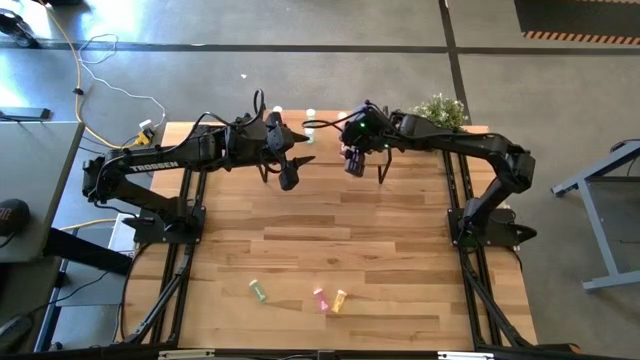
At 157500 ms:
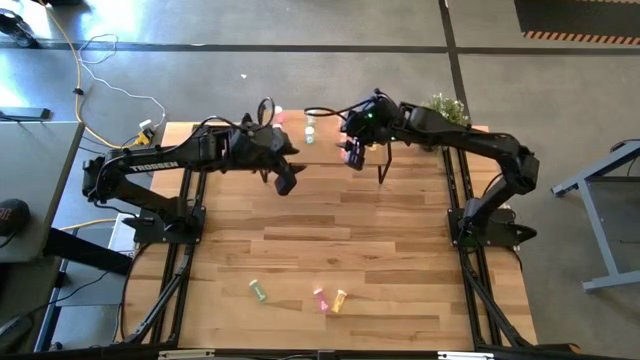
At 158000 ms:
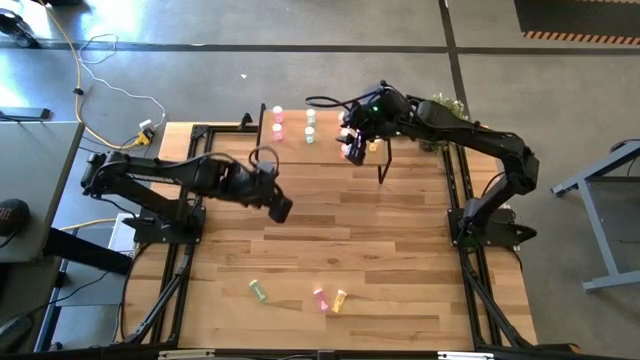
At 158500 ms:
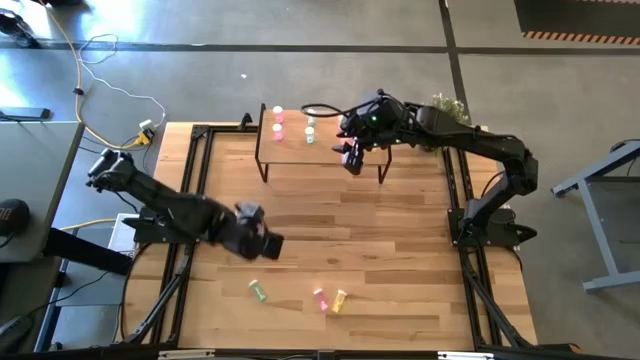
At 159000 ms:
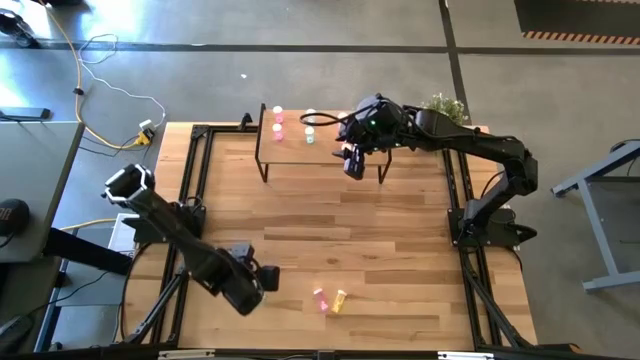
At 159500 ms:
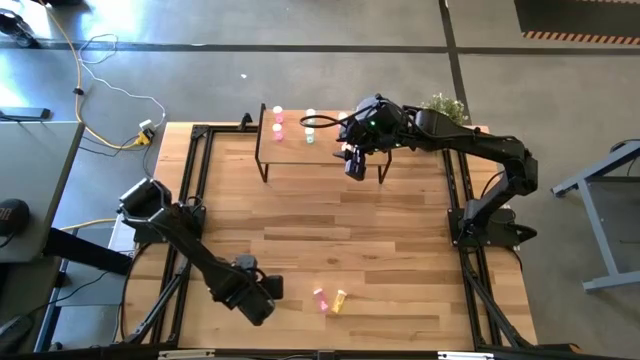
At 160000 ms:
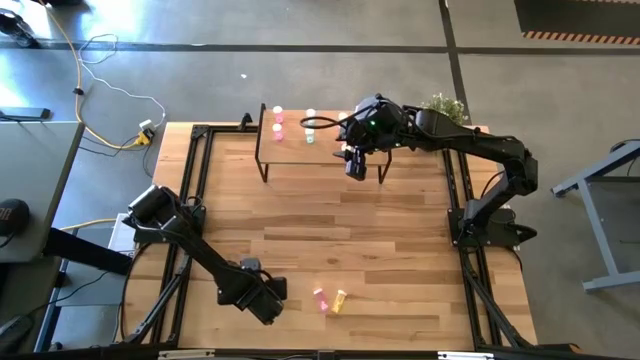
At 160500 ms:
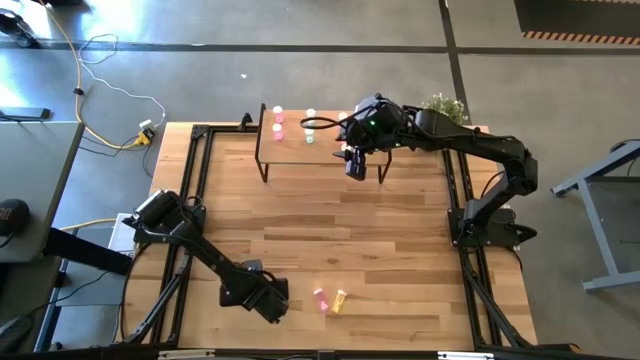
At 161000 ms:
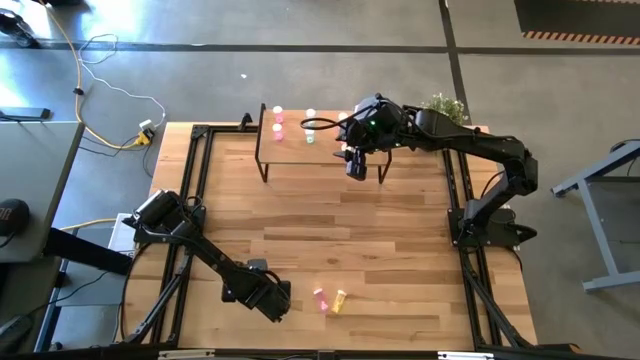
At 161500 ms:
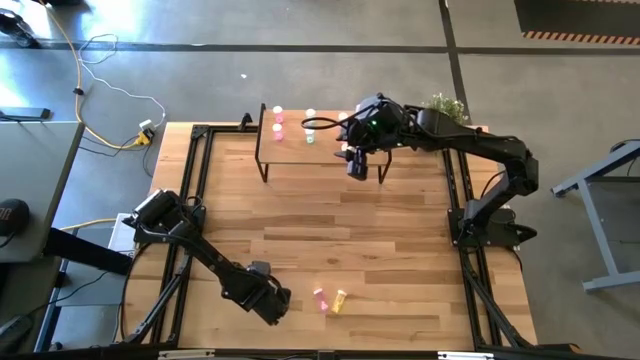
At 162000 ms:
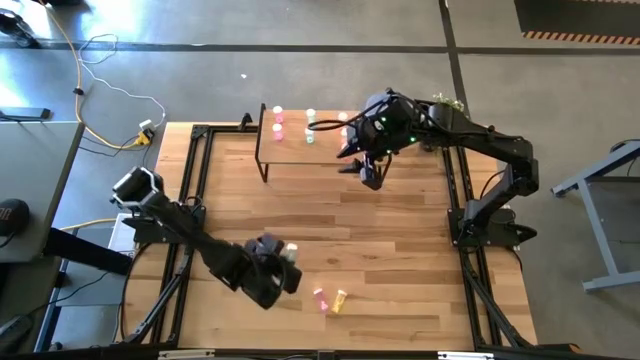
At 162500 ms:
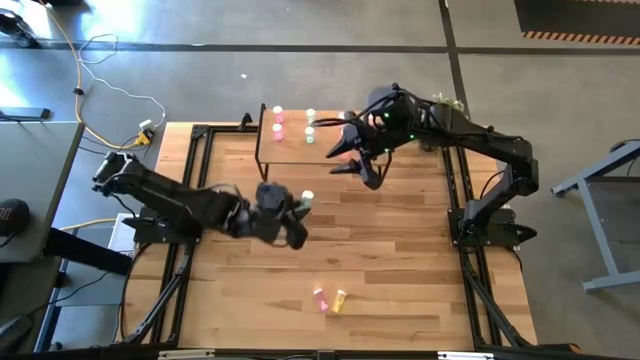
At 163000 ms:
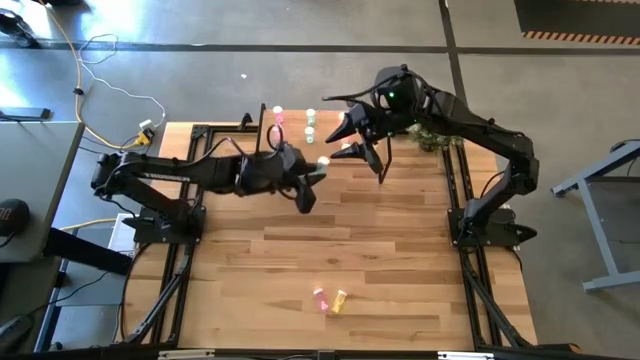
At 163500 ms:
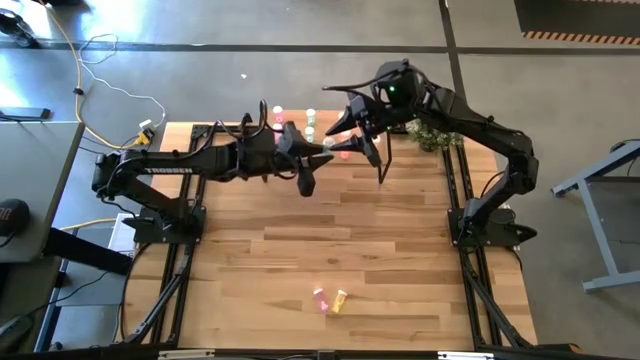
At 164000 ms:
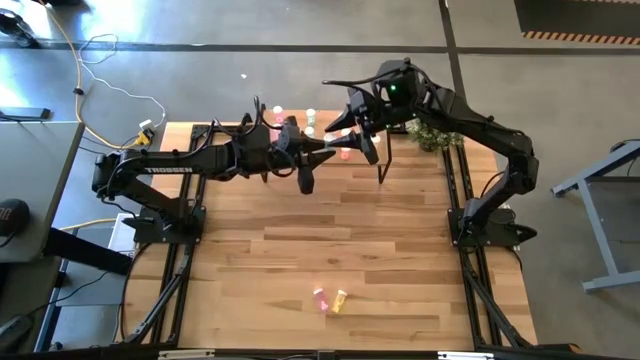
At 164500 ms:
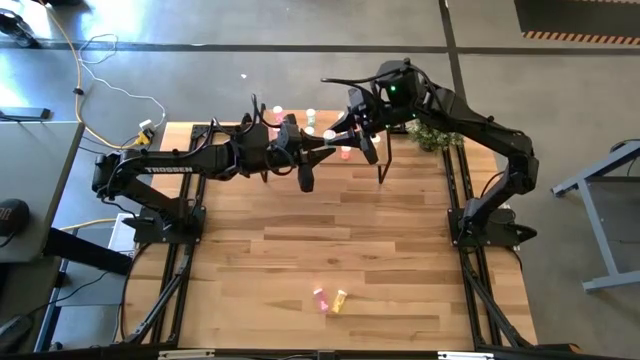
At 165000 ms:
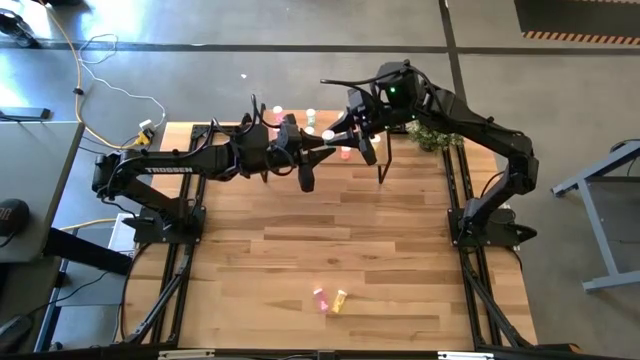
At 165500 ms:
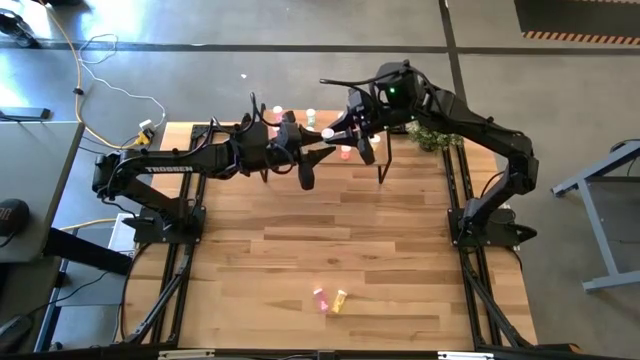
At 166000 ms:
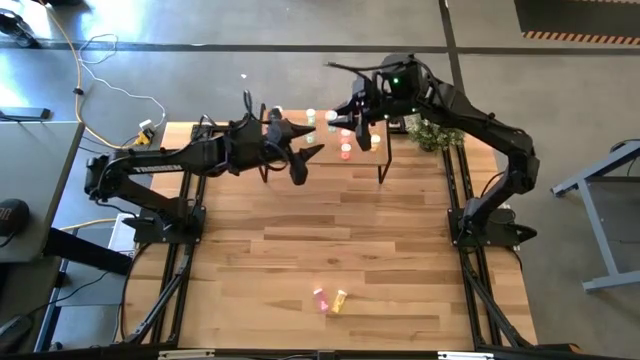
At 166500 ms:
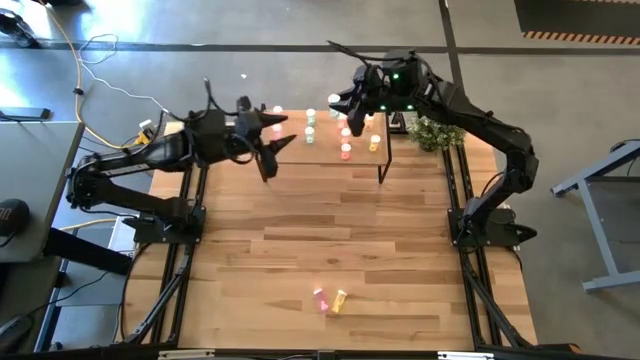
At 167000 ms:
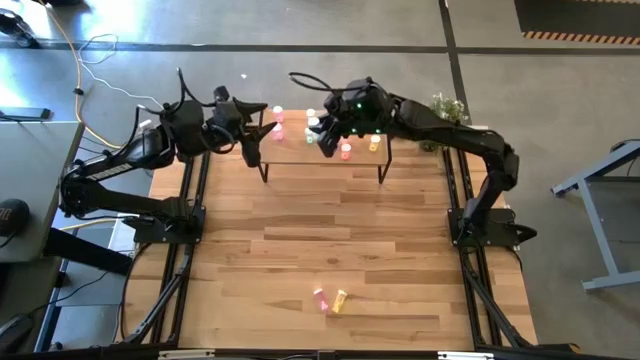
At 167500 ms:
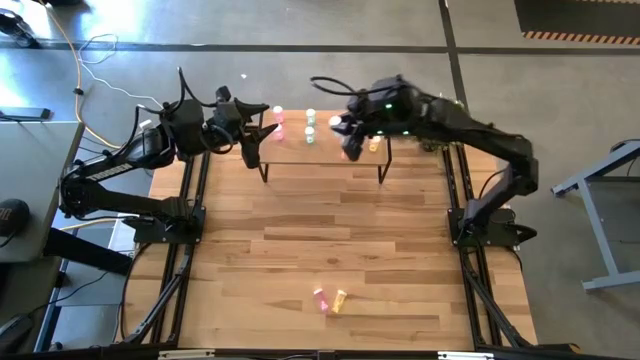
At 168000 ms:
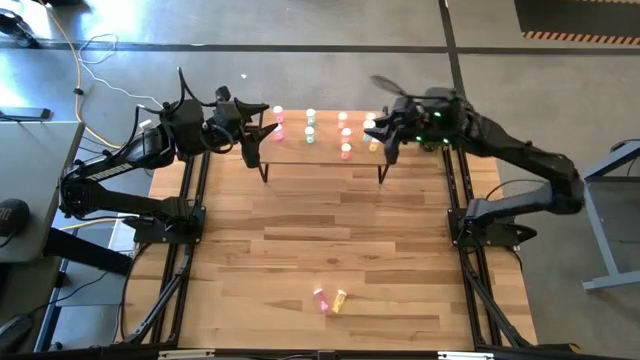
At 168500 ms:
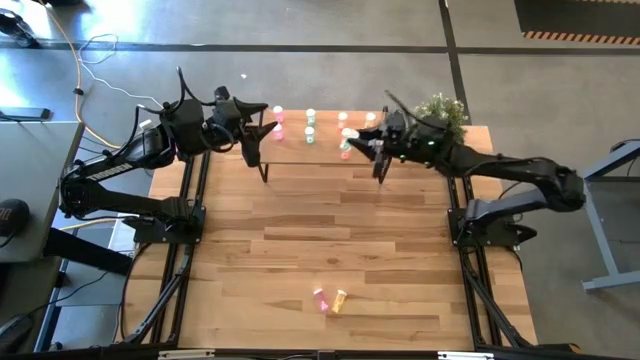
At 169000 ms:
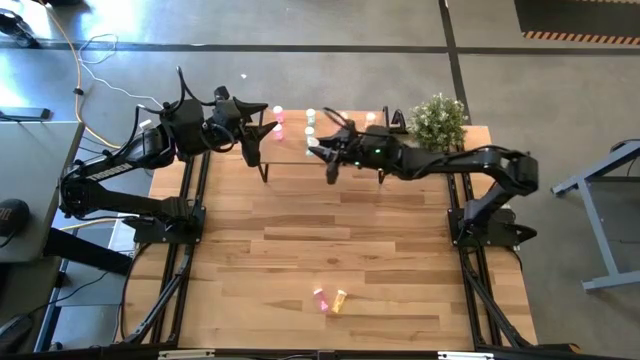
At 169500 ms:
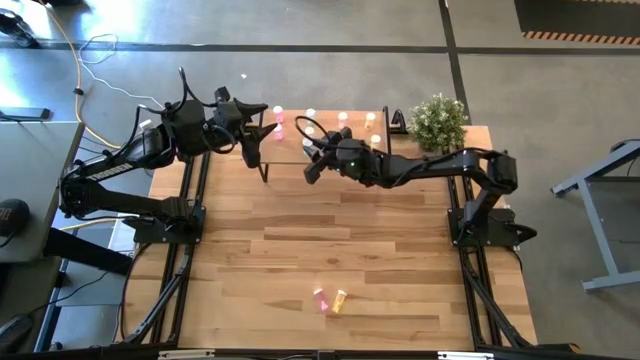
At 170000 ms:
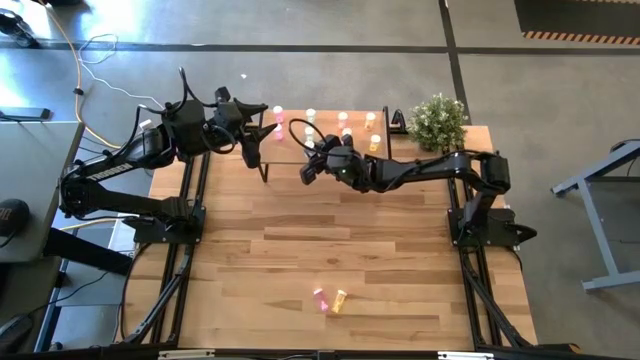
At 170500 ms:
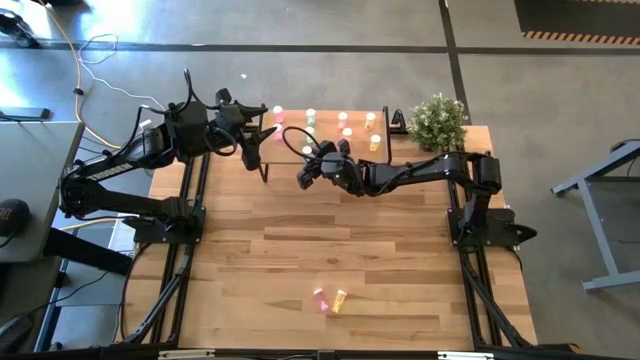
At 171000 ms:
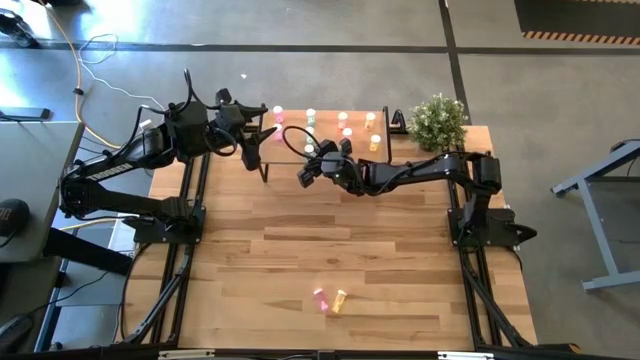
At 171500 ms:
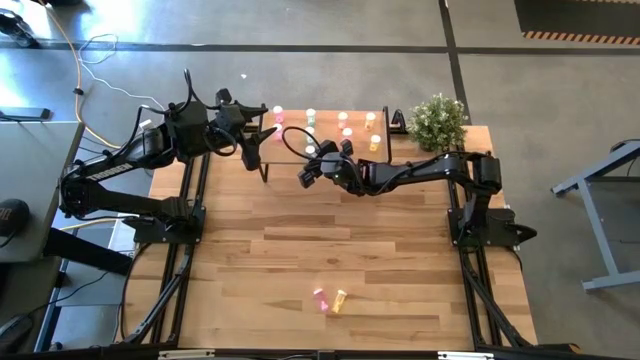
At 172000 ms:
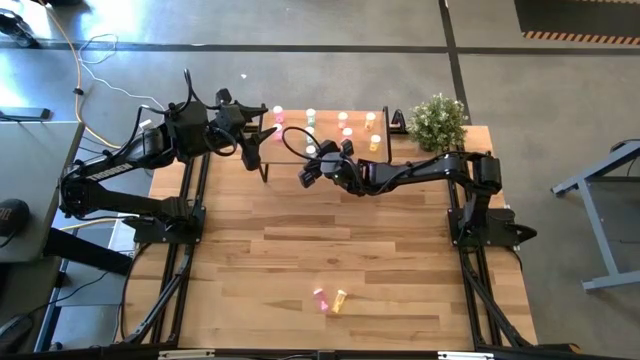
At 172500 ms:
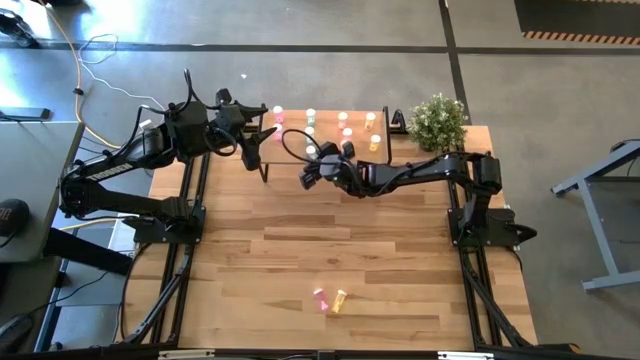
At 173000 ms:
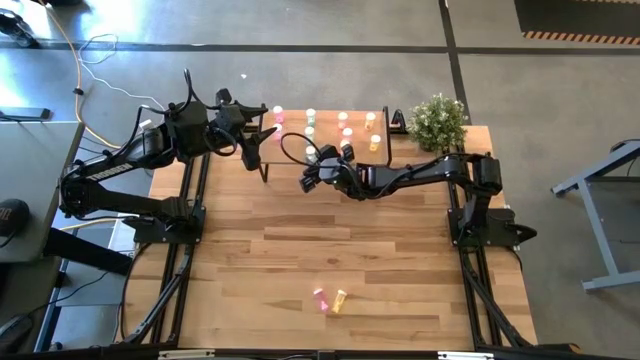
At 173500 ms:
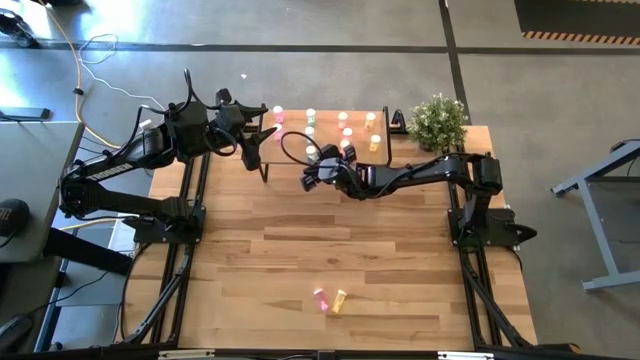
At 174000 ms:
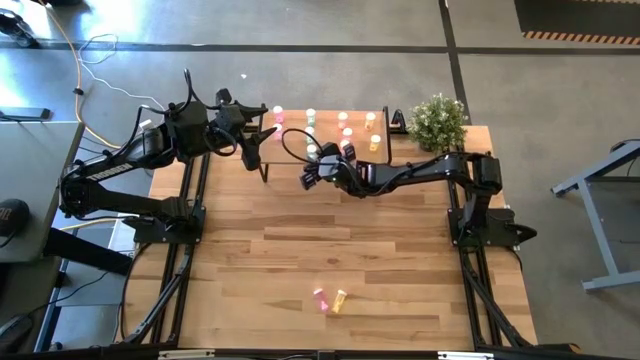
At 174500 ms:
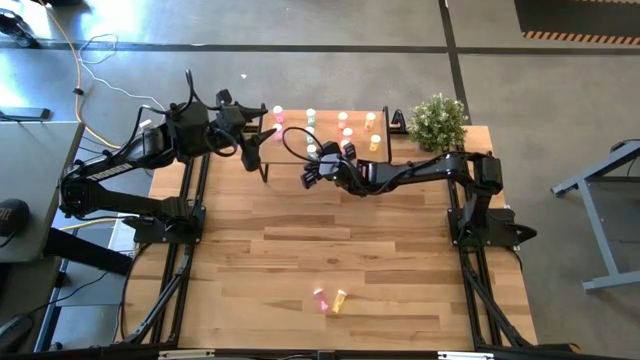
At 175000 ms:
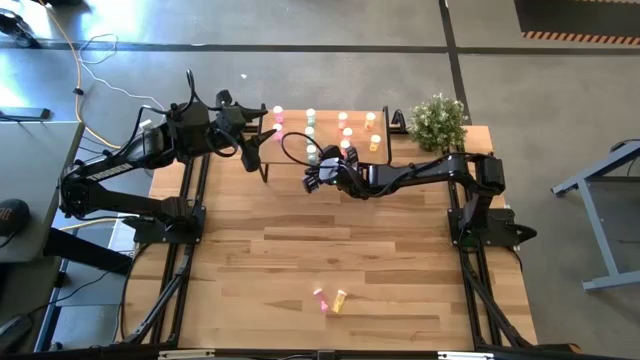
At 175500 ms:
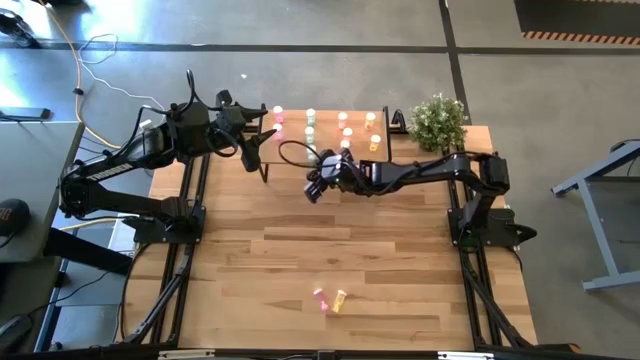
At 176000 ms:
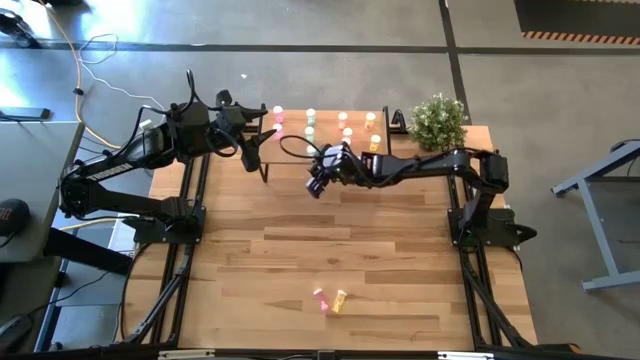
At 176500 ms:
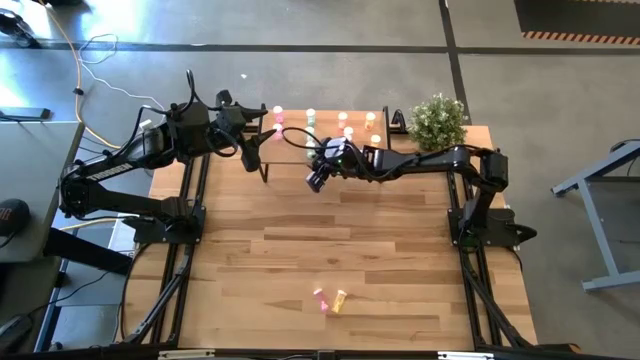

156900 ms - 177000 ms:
Task: Pick and place medicine bottles onto shelf by color
Put the blue pill bottle on the shelf aligned with the other blue pill bottles
